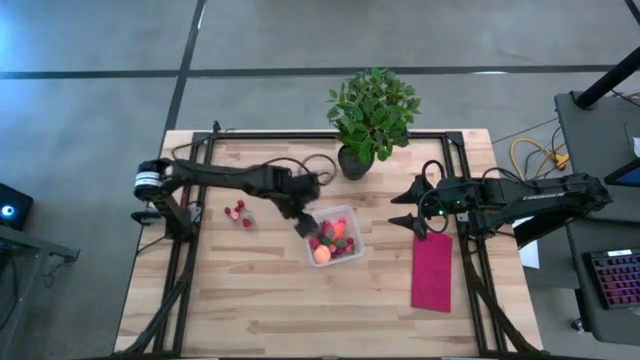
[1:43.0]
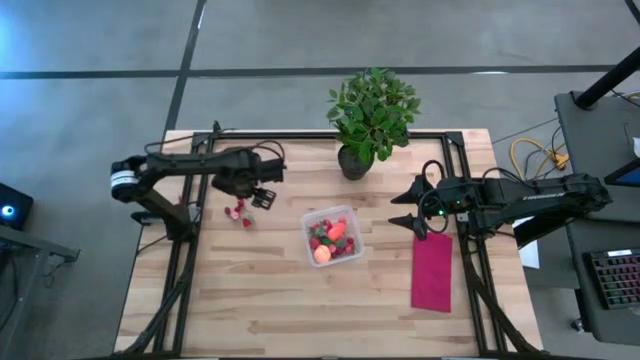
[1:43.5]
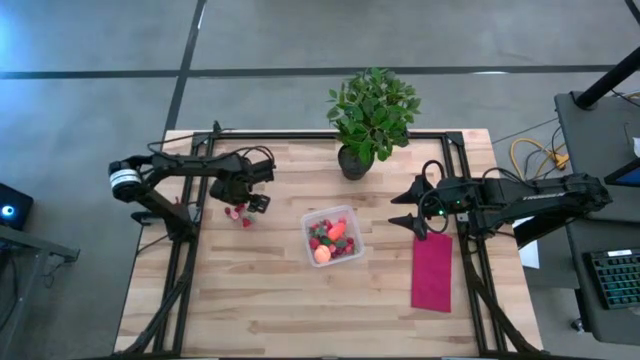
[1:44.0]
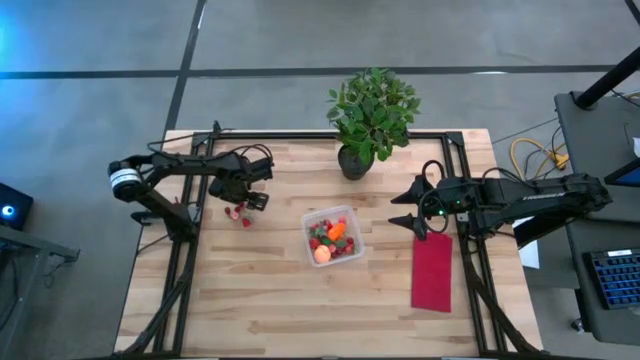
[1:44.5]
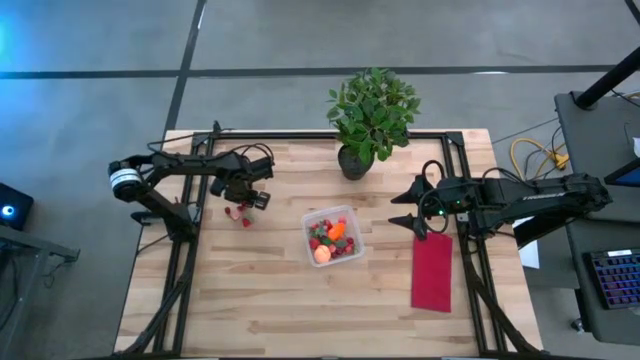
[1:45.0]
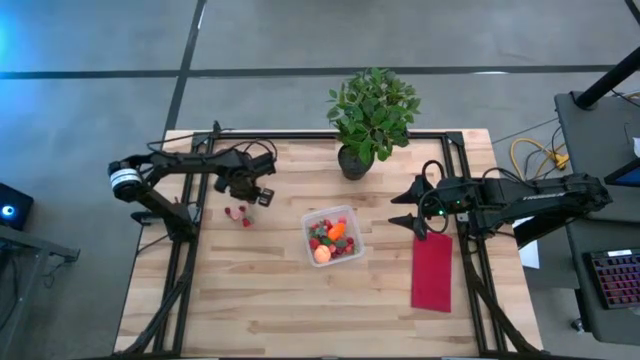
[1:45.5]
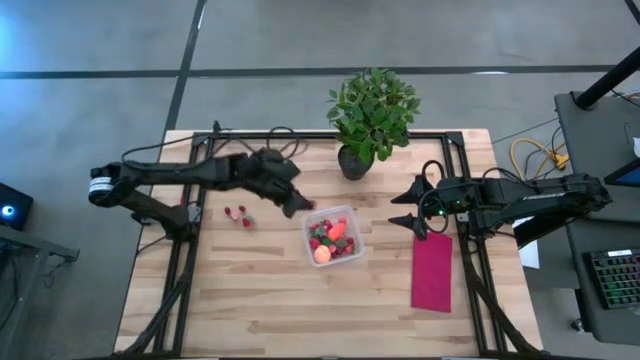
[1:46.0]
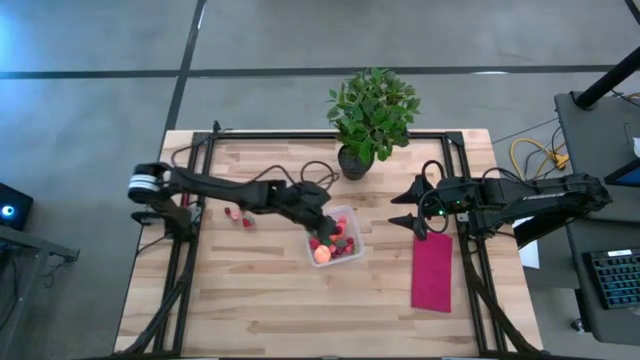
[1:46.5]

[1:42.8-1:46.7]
Task: Pick and placing Produce into tupperware
Put the red cherry into the transparent bin

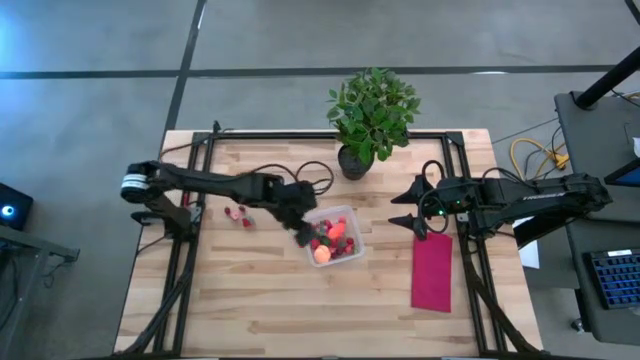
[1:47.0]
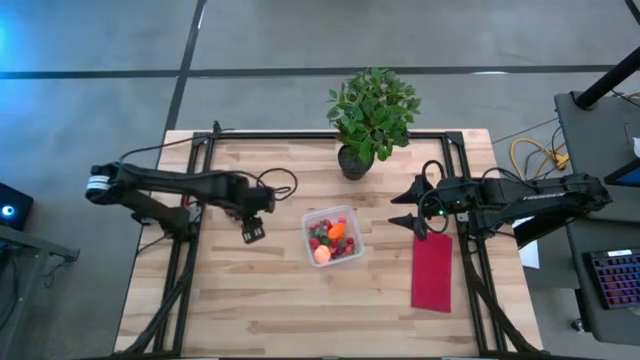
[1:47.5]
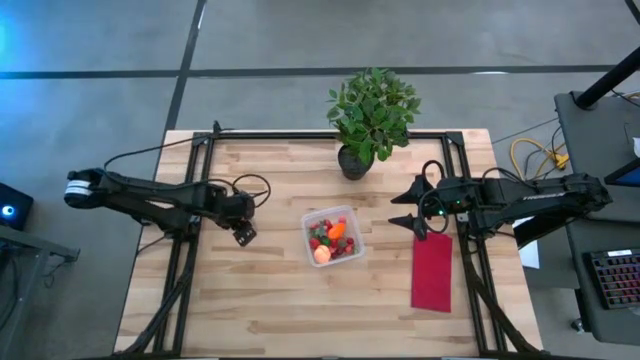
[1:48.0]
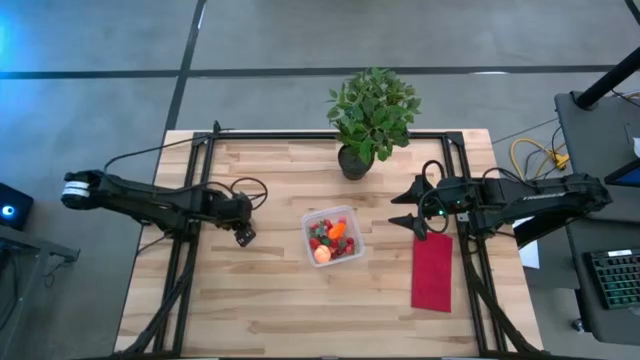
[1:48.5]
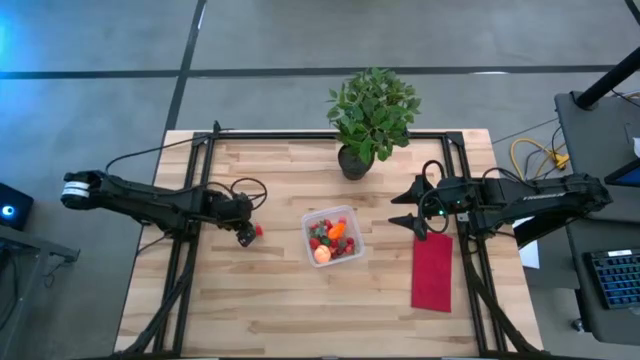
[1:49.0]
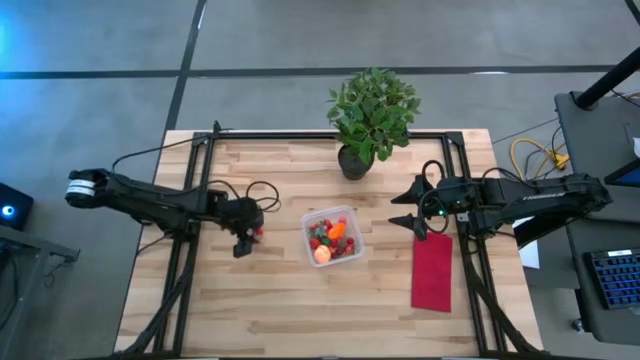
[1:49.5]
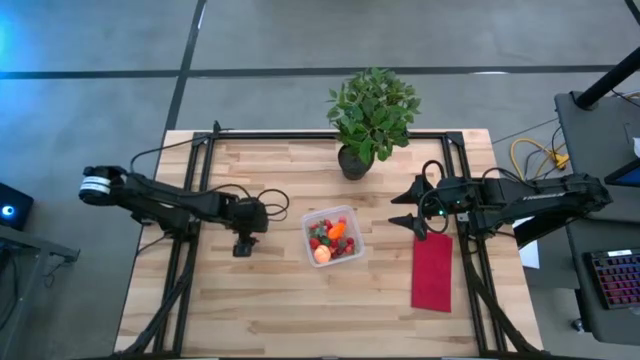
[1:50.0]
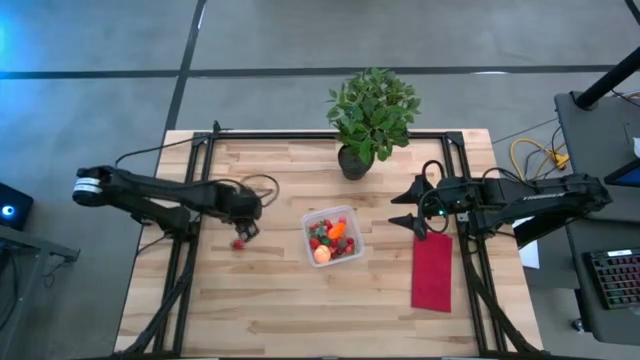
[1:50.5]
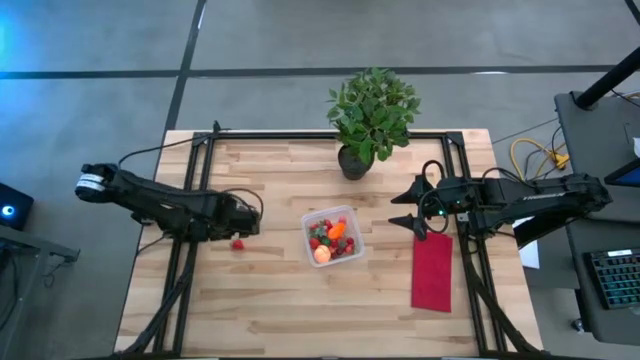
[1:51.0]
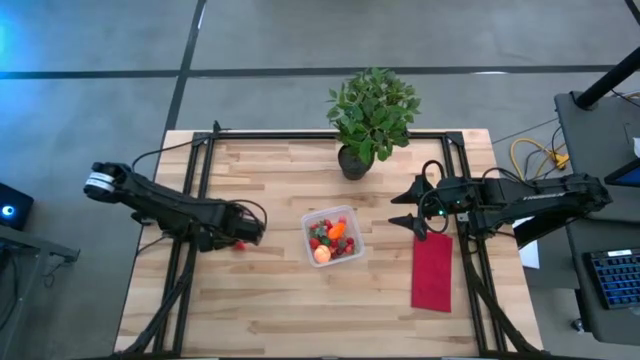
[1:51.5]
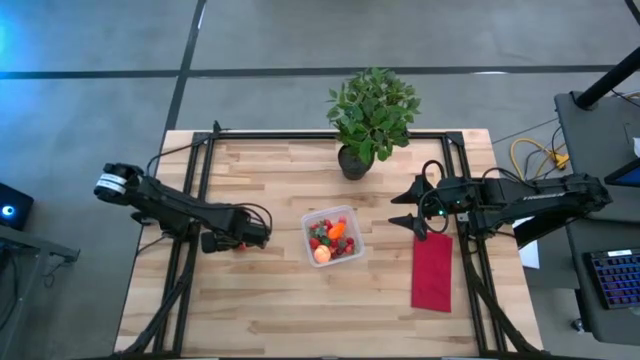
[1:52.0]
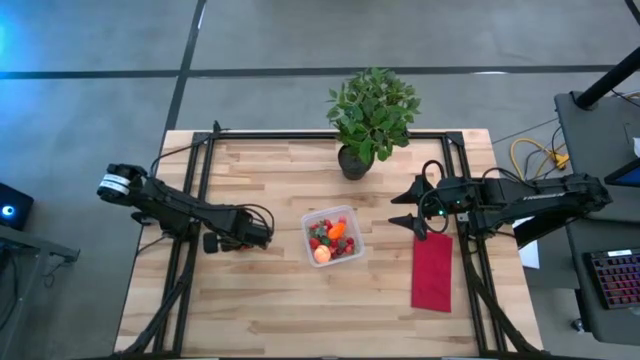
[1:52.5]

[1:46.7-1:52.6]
Put the red strawberry into the transparent bin

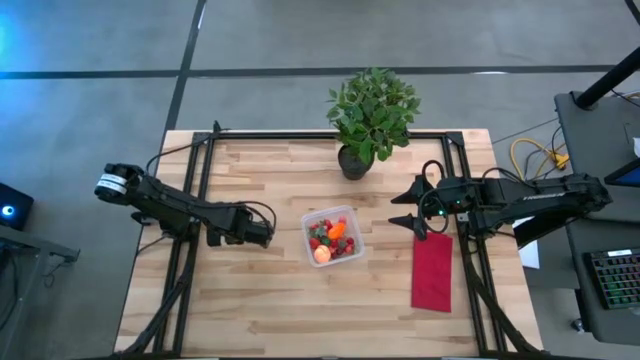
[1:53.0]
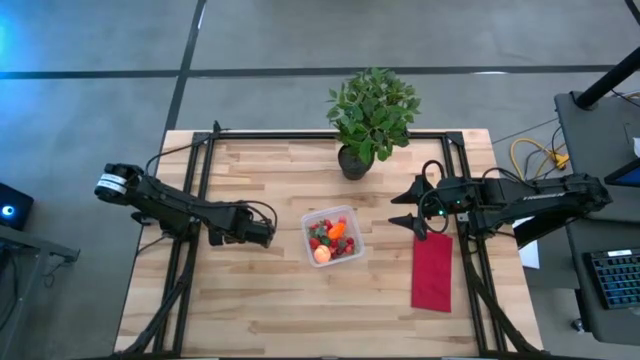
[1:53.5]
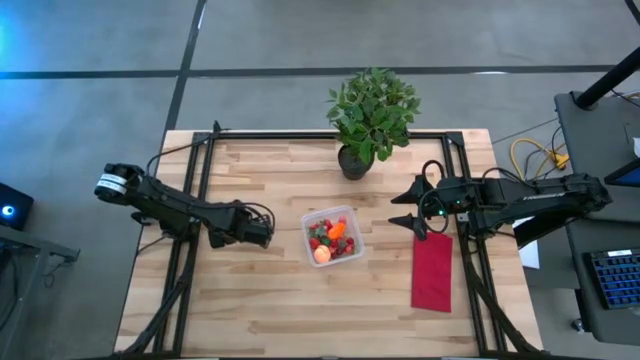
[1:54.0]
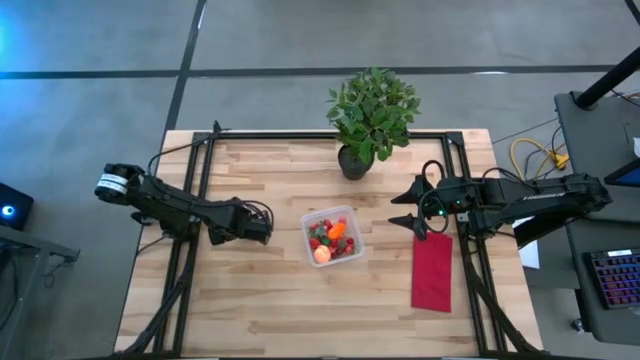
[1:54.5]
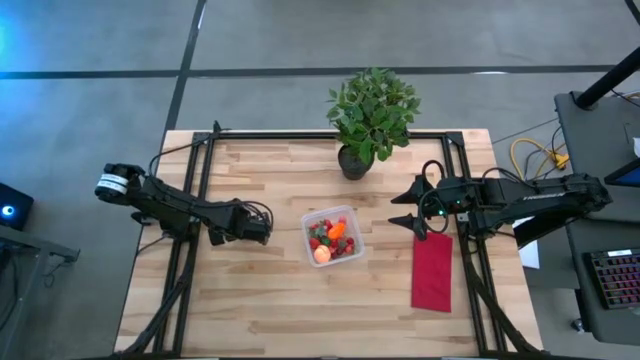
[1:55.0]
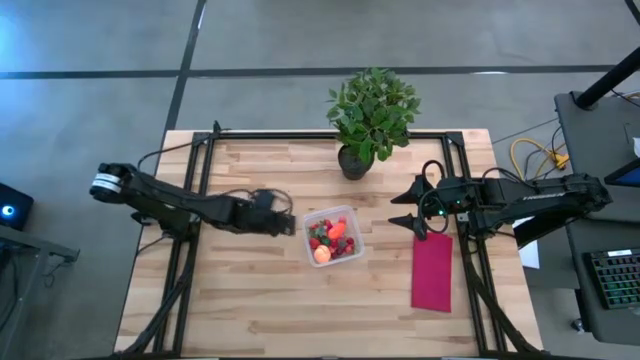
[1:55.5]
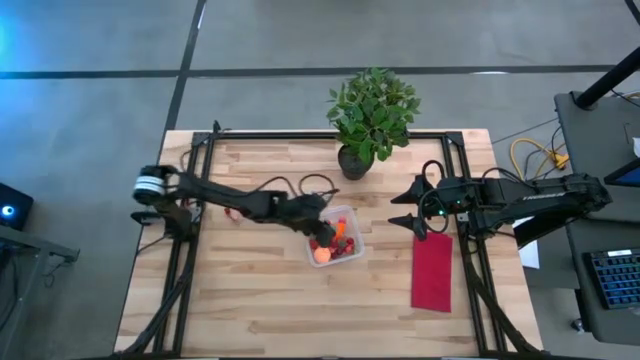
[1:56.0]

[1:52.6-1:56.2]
Put the red strawberry into the transparent bin

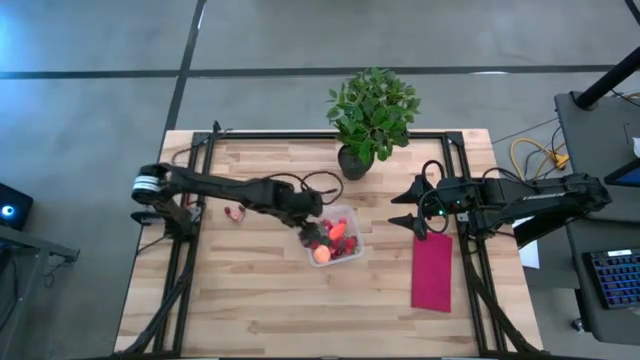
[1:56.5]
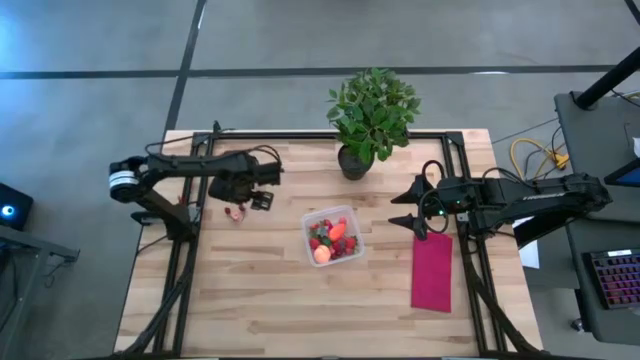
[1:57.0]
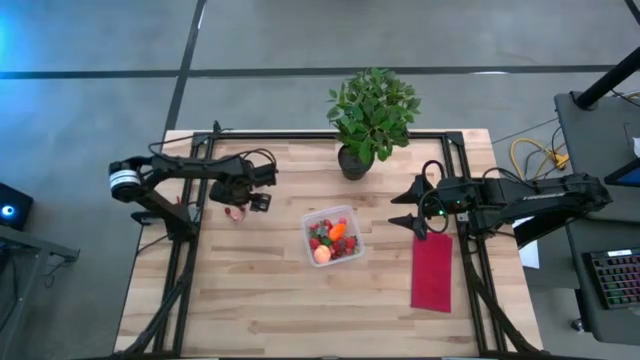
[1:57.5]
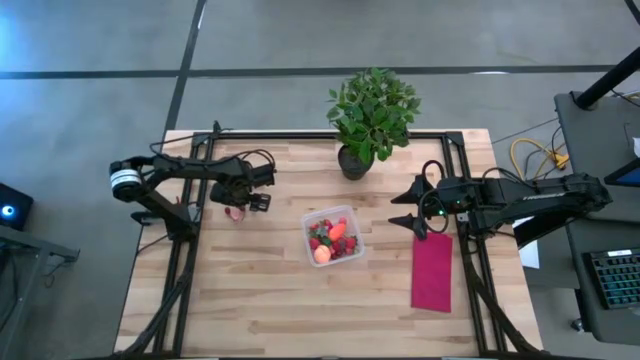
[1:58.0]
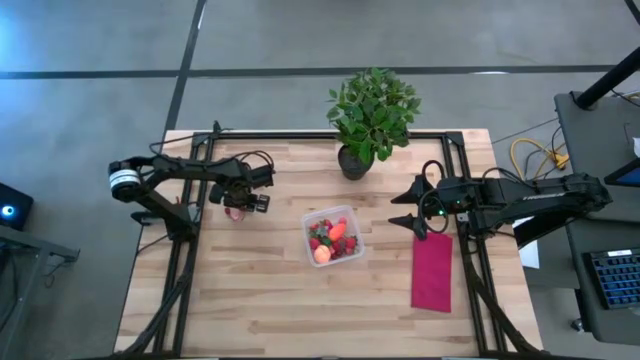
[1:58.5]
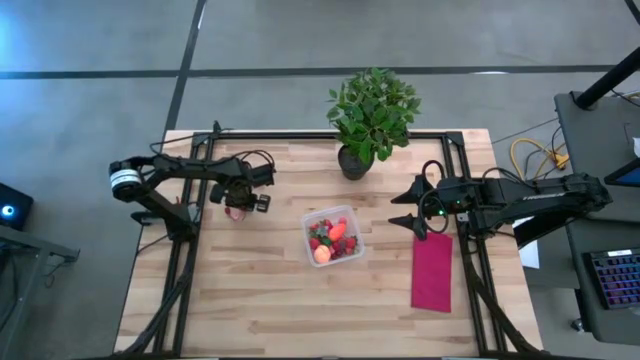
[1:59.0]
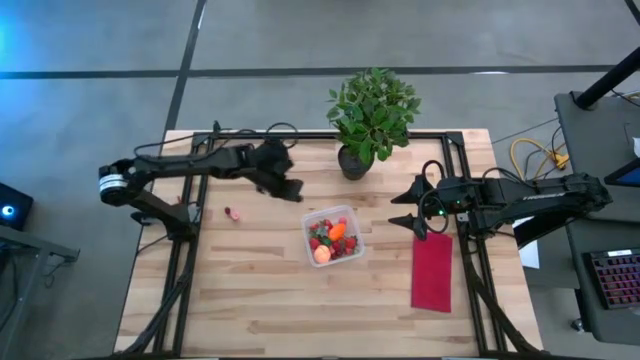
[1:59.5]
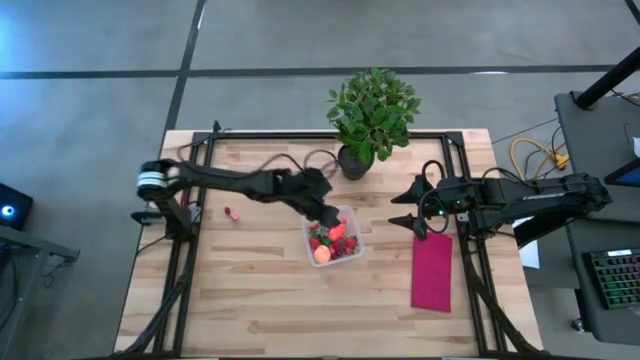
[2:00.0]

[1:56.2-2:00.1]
Put the red cherry into the transparent bin

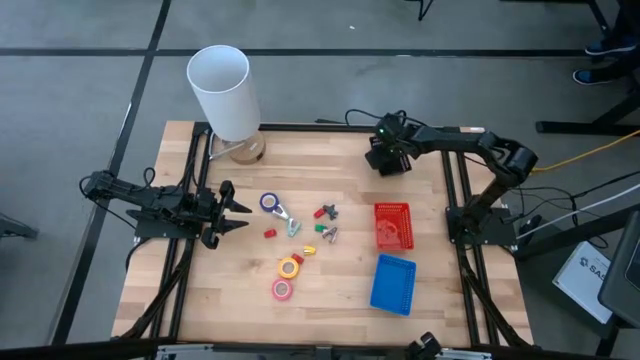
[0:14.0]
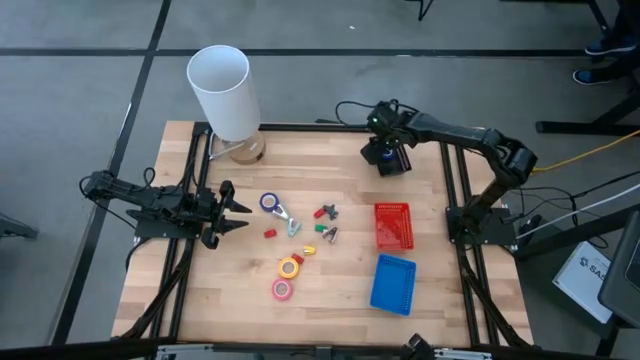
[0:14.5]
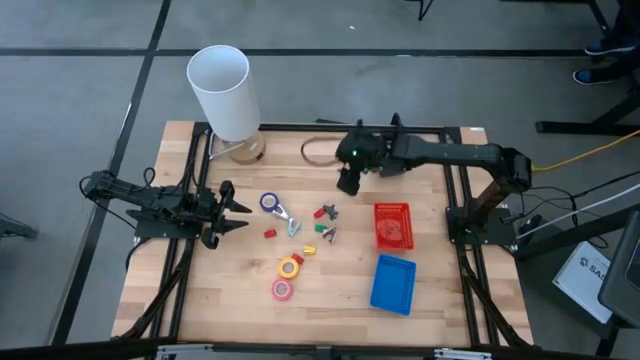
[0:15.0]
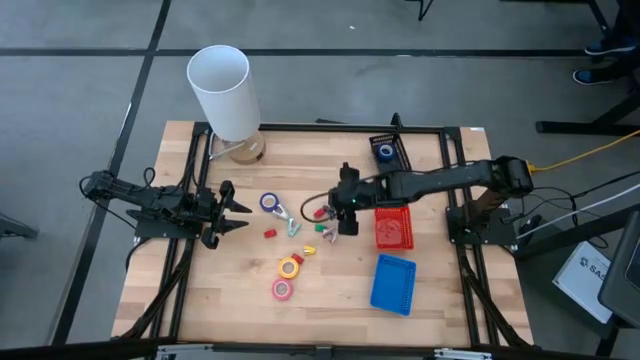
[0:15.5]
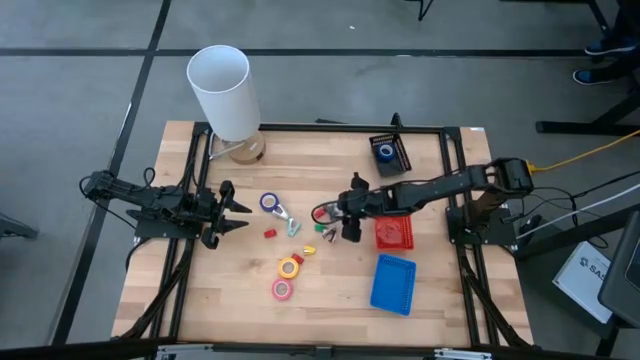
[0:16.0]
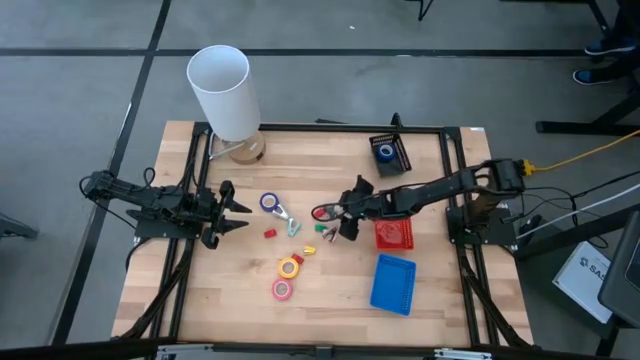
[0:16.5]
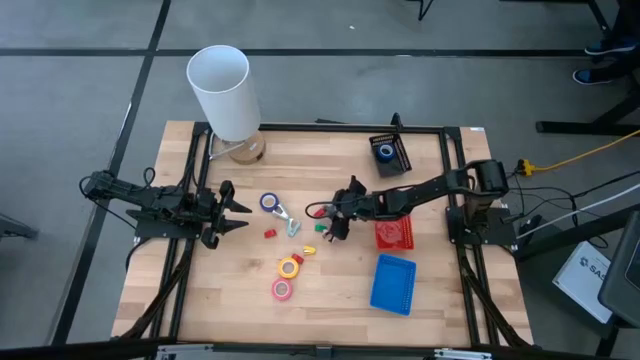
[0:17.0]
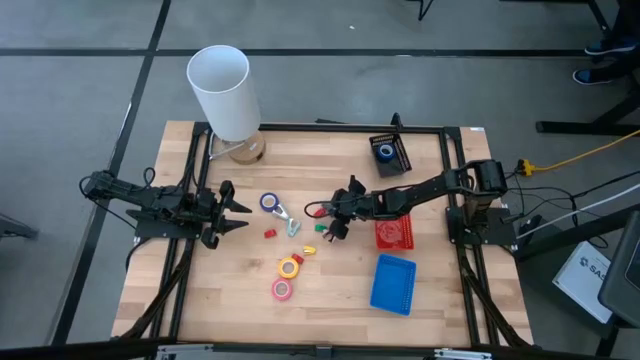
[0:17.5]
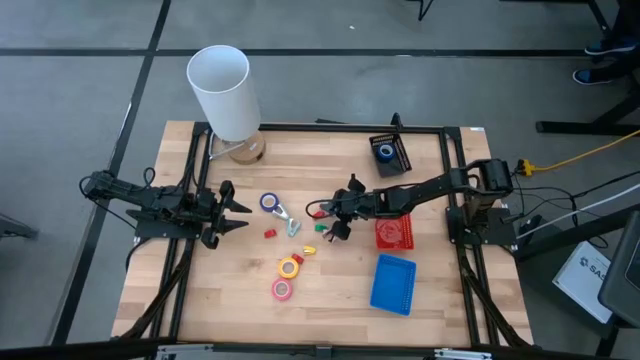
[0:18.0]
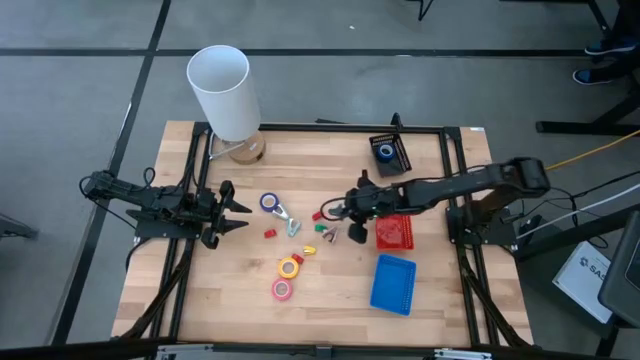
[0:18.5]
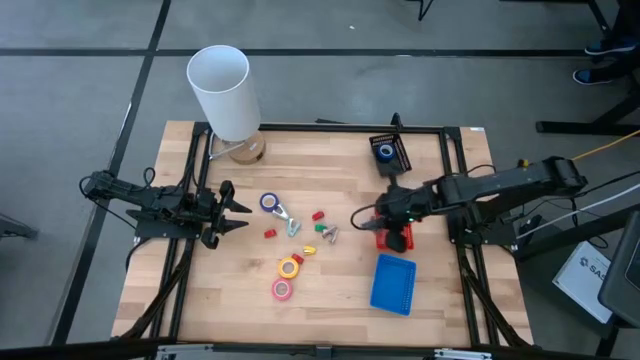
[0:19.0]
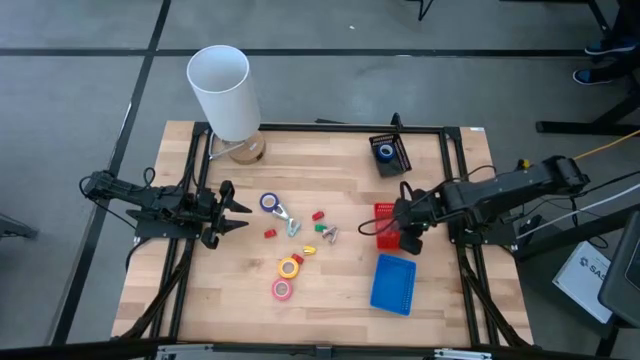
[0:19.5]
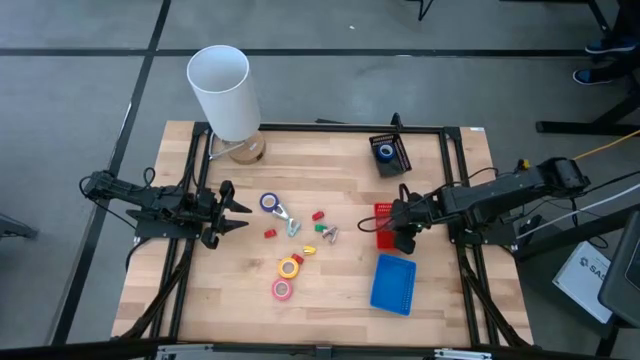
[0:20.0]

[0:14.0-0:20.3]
Task: Pick and place Stapler, Stapler remover, tape
Put the gray staple remover into the red basket
